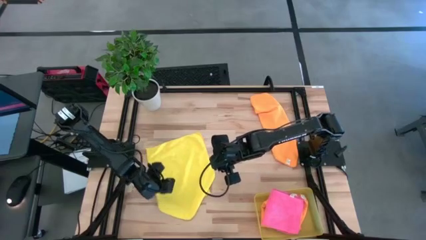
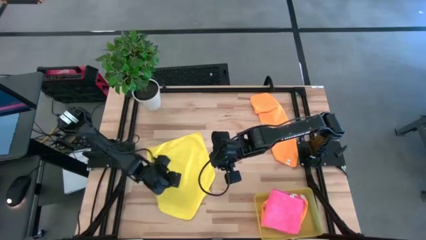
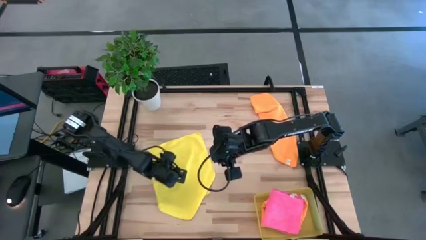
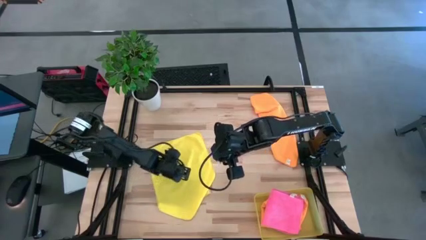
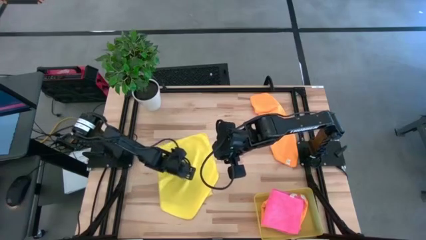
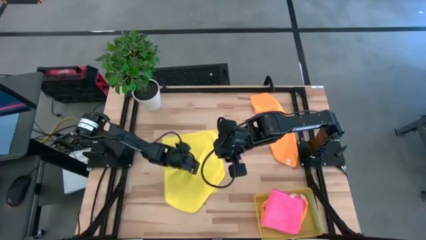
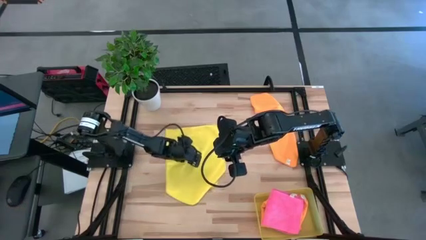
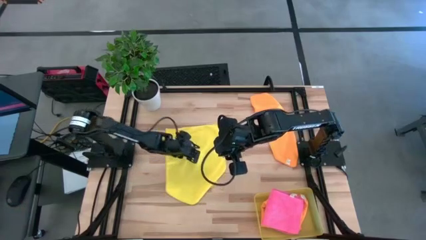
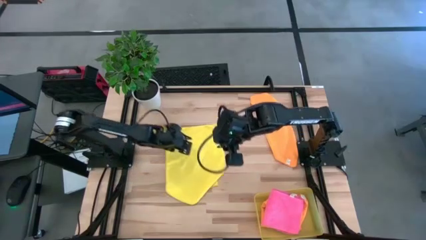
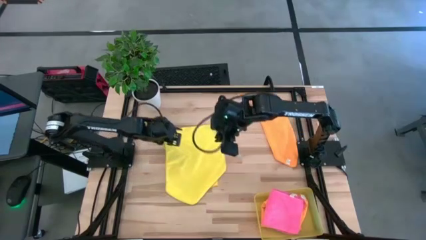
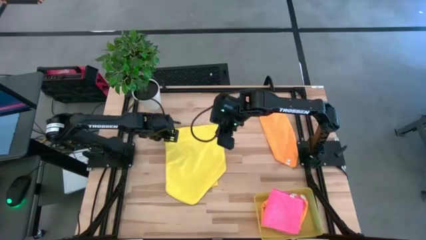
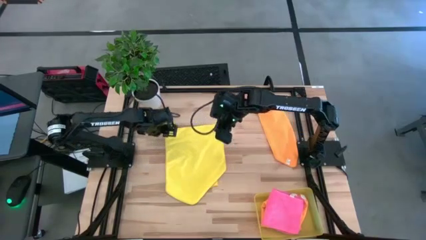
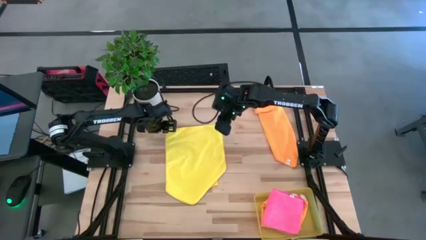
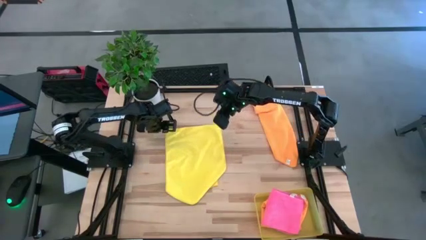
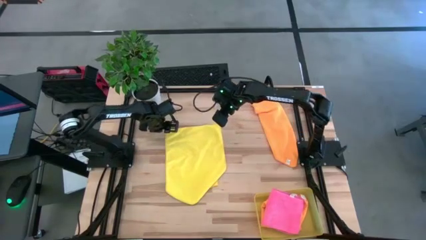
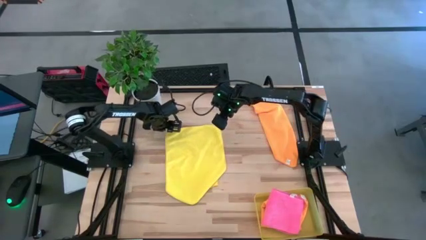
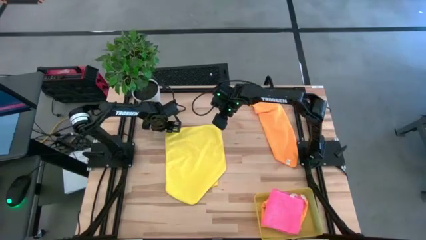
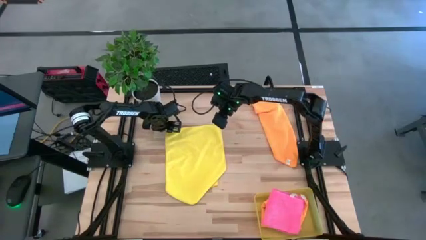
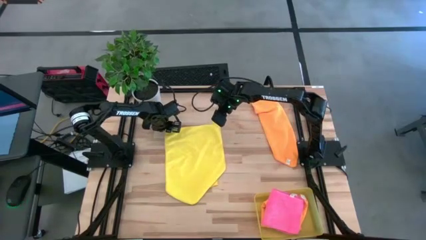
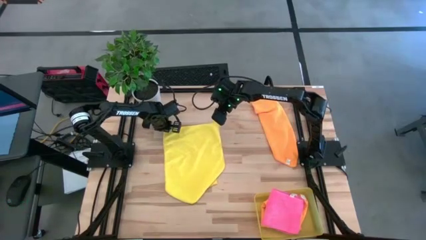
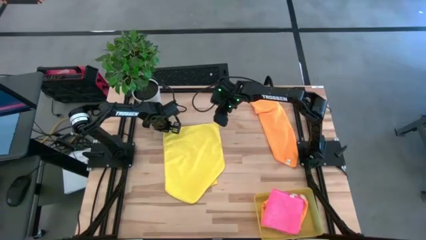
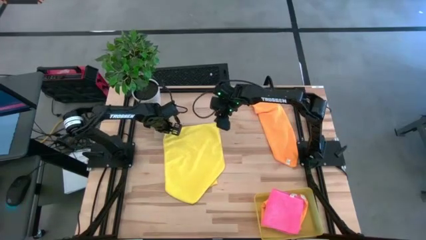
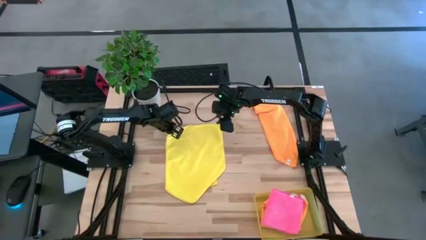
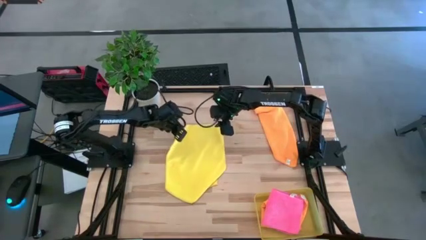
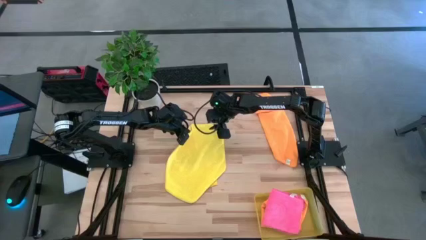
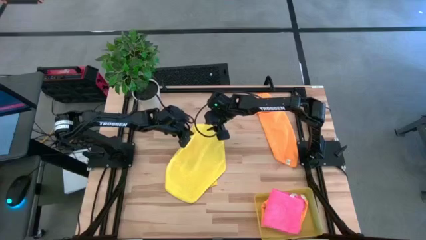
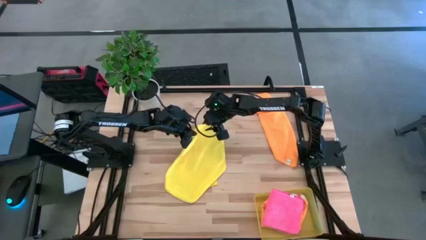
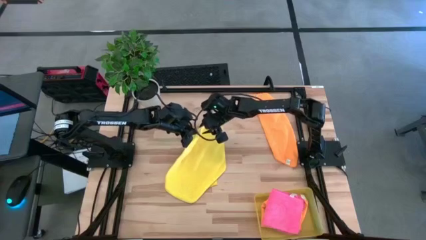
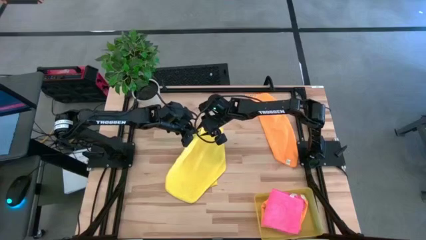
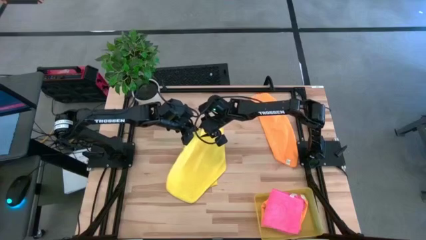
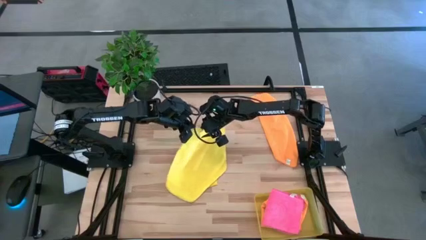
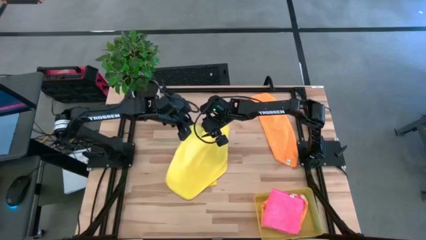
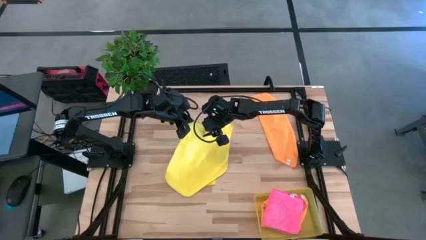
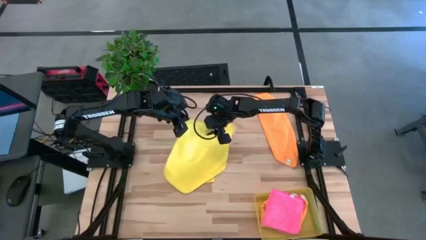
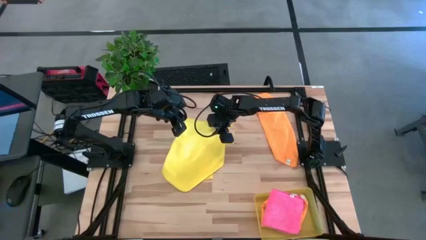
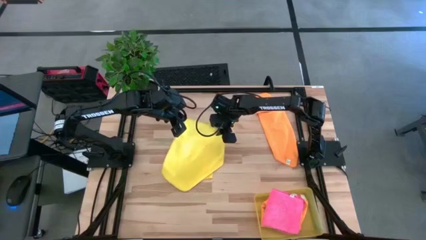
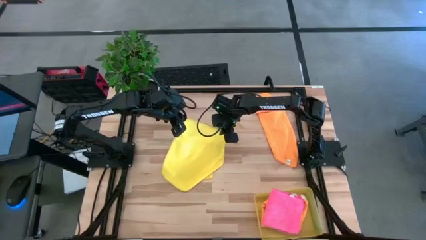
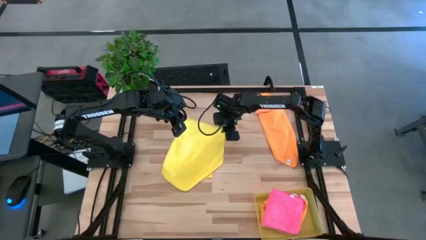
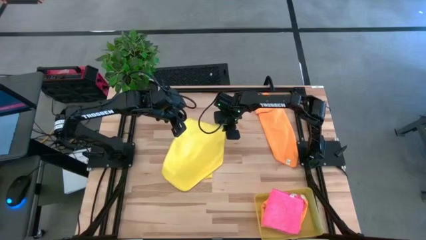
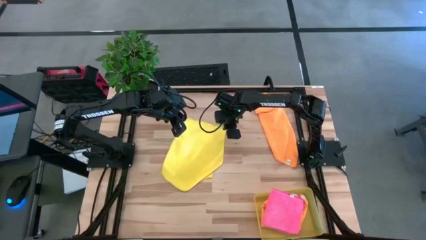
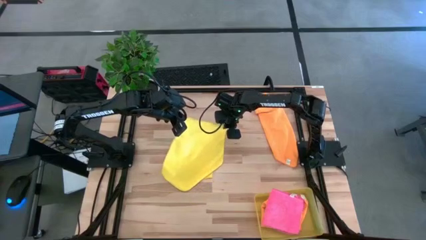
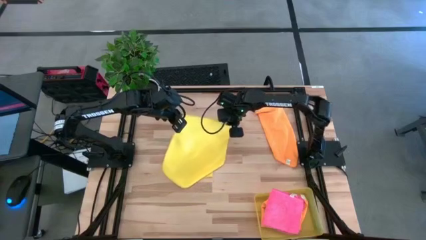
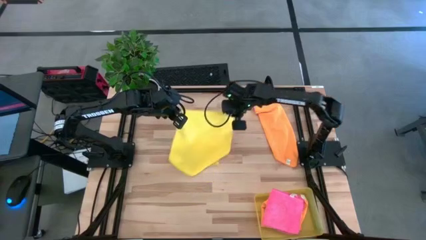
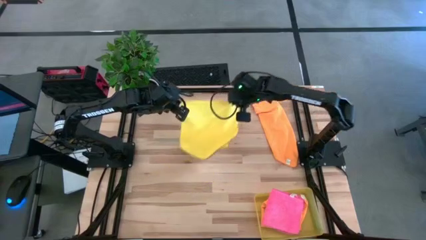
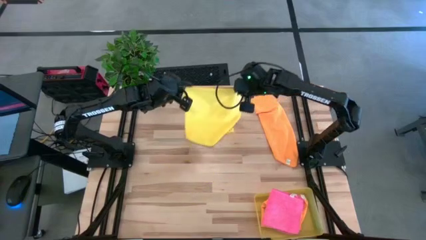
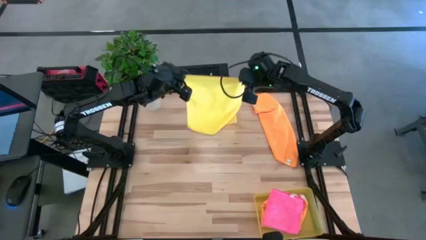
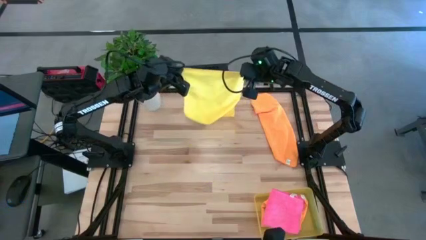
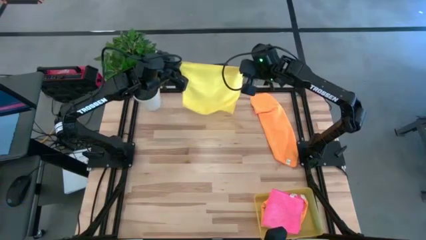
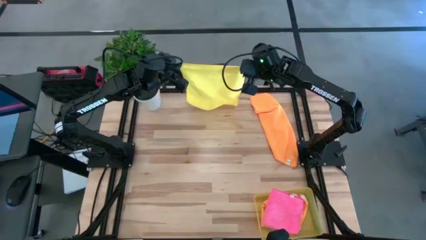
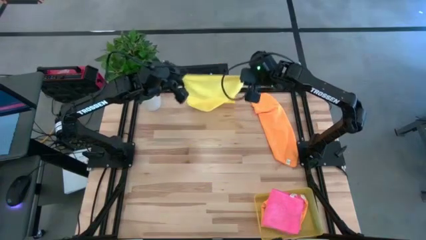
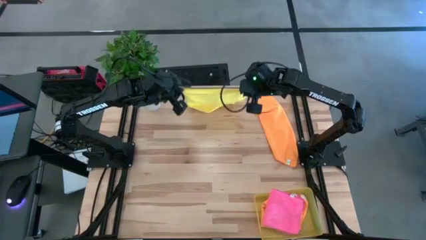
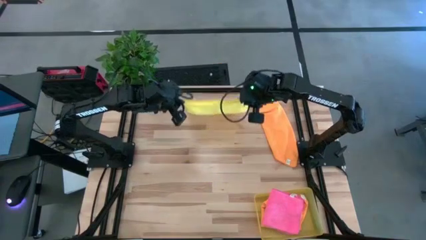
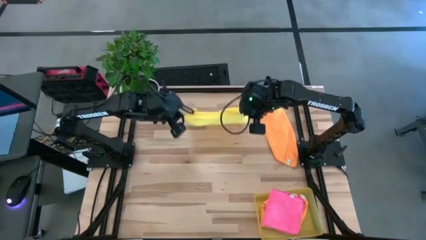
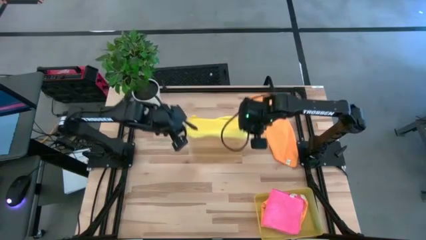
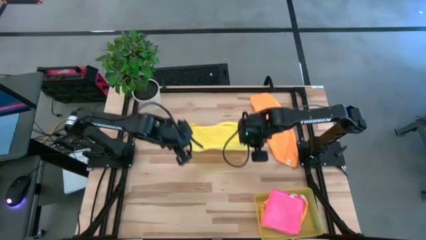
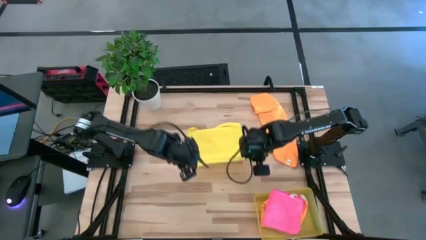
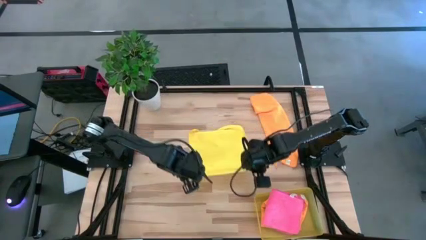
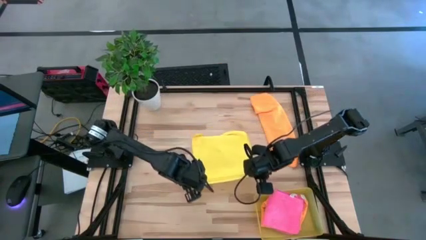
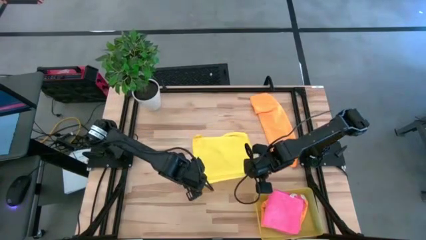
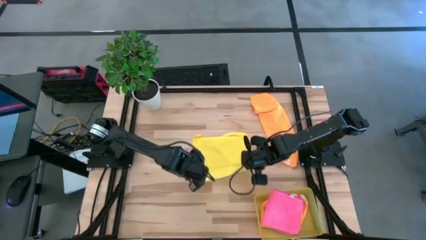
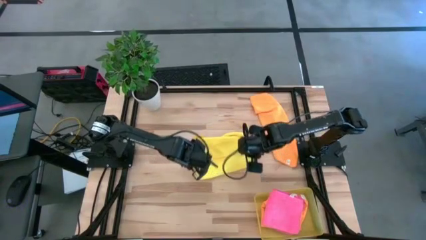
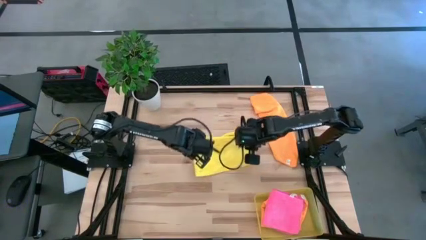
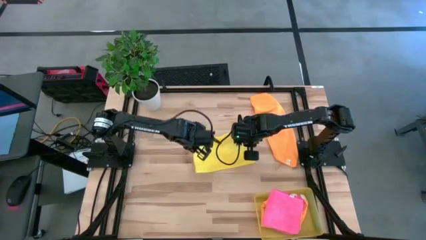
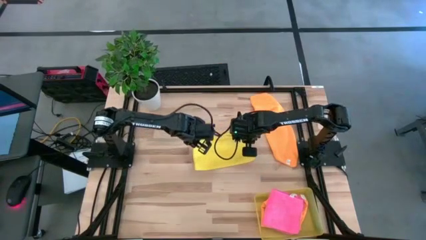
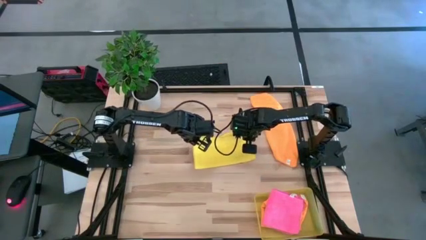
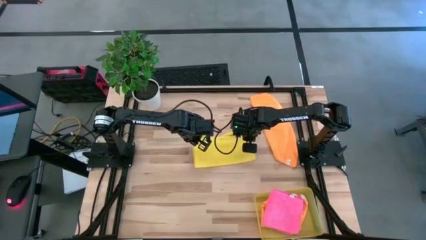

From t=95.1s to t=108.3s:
Task: Fold microfiber towels
Fold the yellow microfiber cloth
